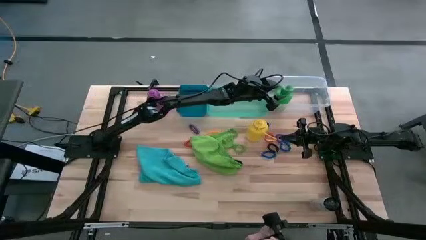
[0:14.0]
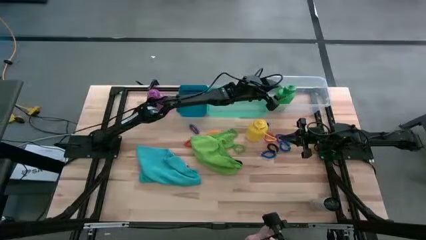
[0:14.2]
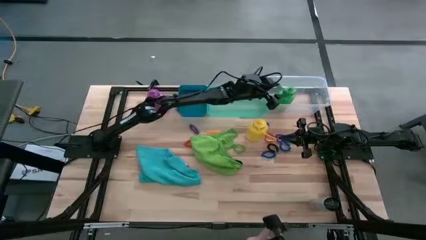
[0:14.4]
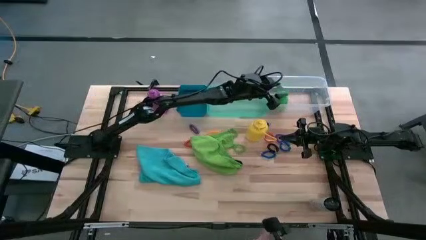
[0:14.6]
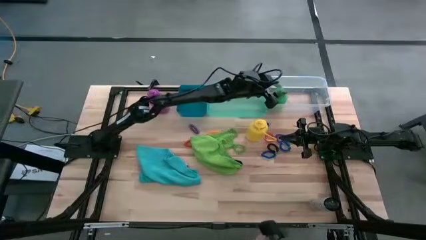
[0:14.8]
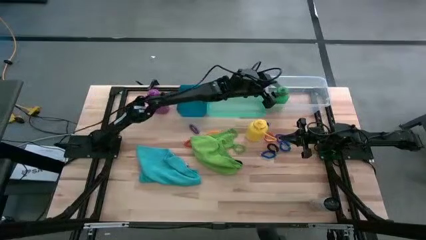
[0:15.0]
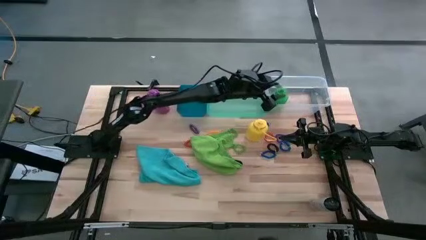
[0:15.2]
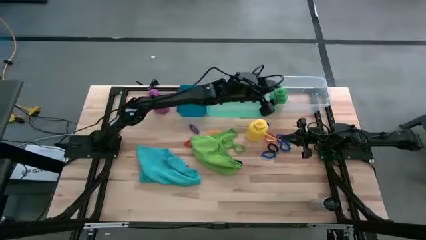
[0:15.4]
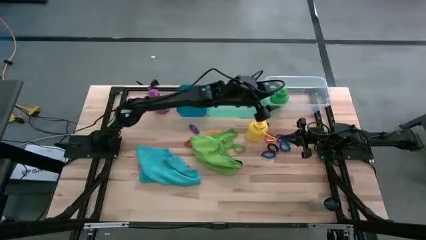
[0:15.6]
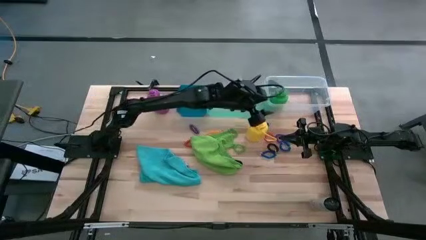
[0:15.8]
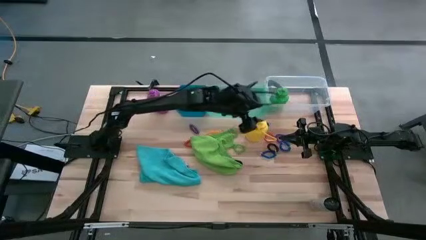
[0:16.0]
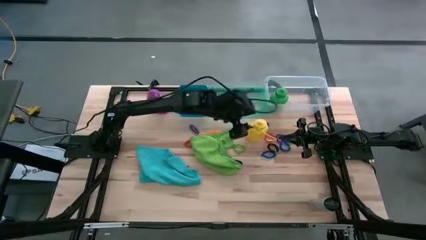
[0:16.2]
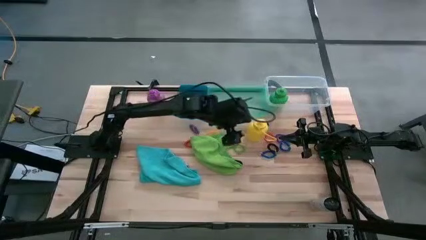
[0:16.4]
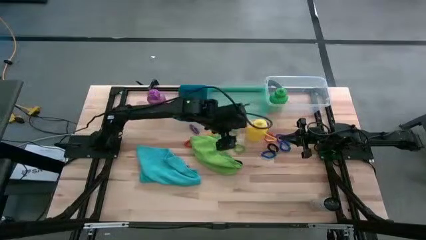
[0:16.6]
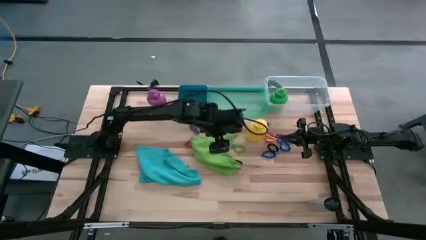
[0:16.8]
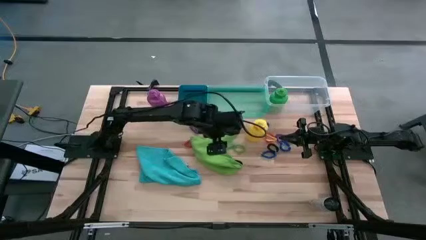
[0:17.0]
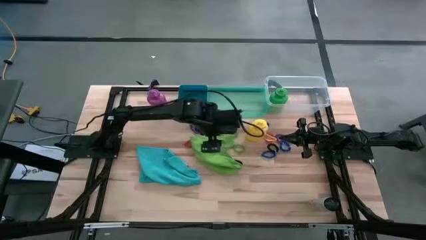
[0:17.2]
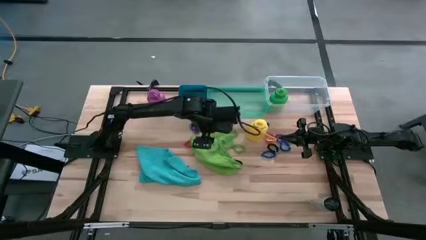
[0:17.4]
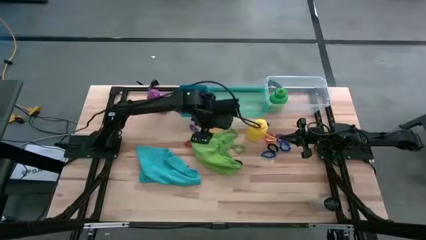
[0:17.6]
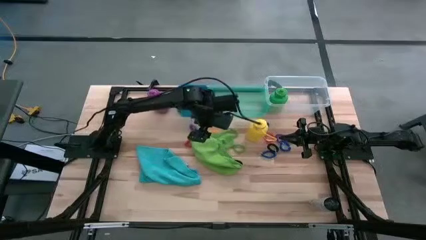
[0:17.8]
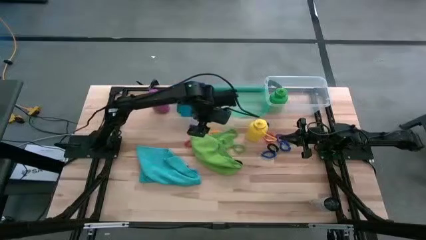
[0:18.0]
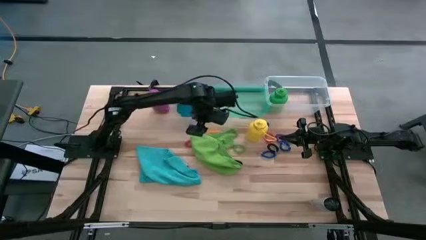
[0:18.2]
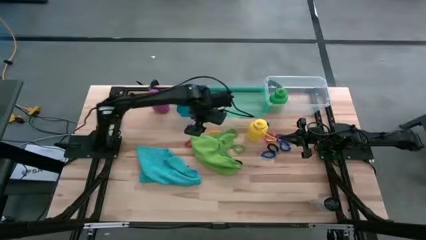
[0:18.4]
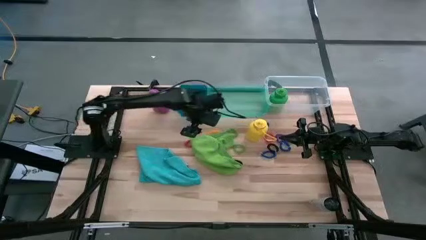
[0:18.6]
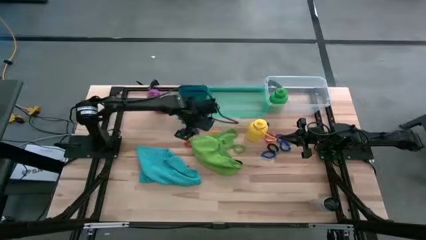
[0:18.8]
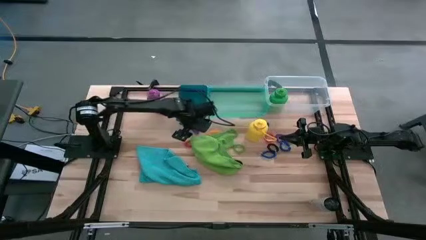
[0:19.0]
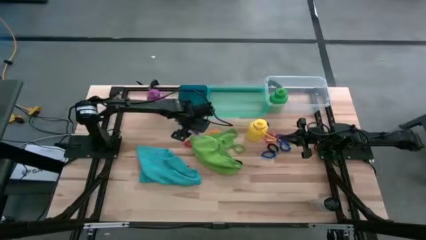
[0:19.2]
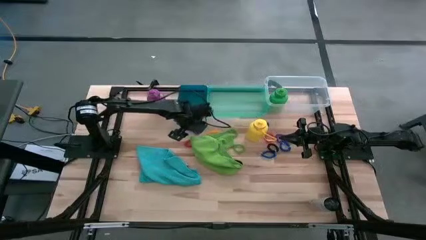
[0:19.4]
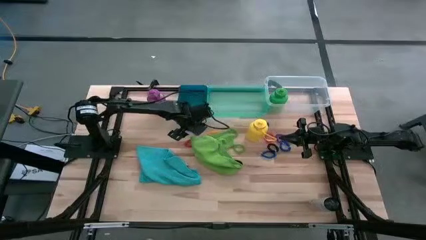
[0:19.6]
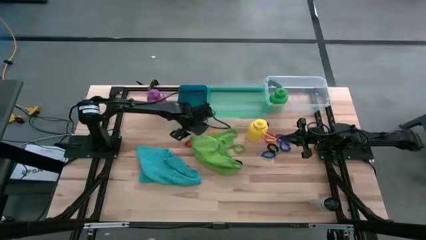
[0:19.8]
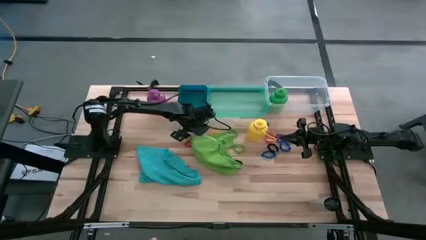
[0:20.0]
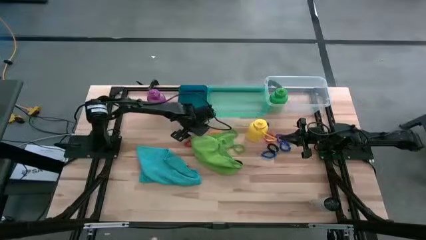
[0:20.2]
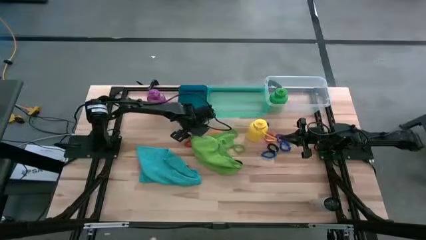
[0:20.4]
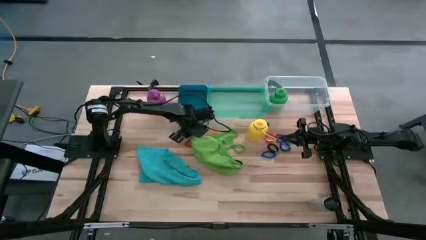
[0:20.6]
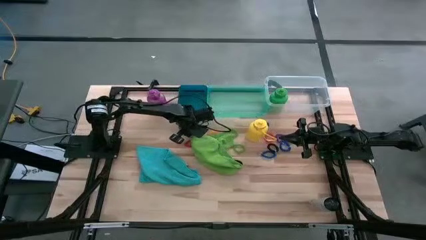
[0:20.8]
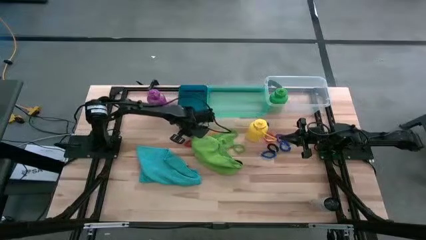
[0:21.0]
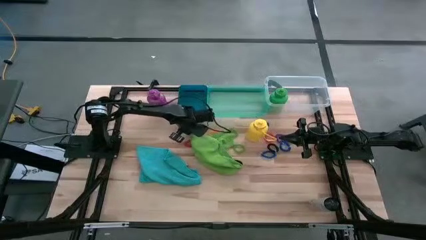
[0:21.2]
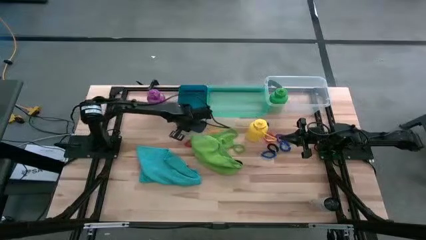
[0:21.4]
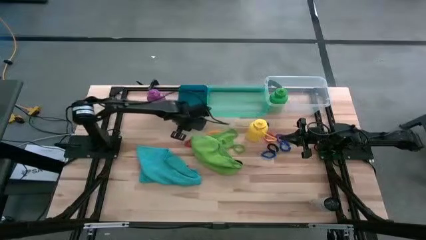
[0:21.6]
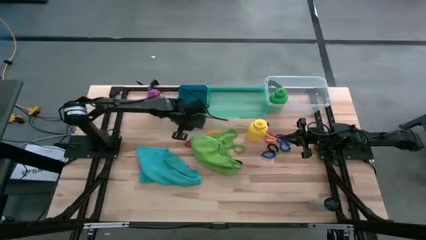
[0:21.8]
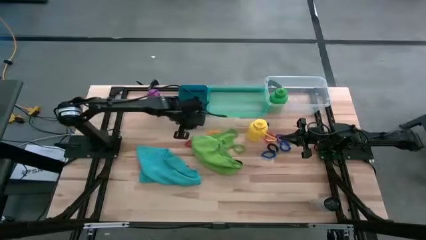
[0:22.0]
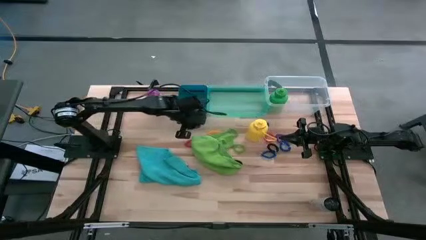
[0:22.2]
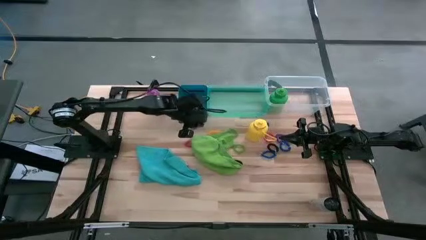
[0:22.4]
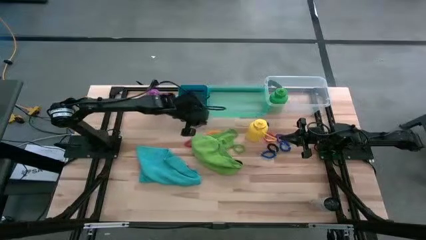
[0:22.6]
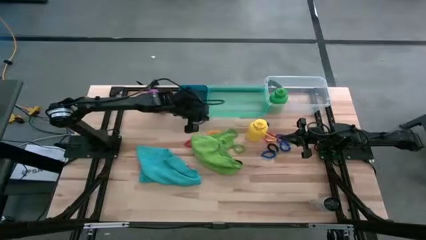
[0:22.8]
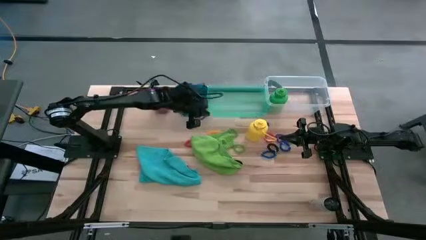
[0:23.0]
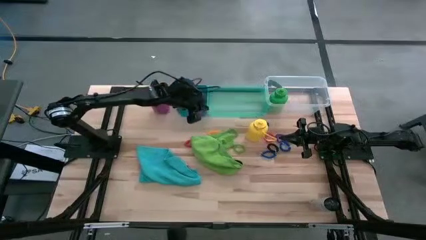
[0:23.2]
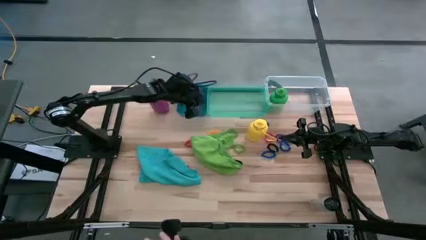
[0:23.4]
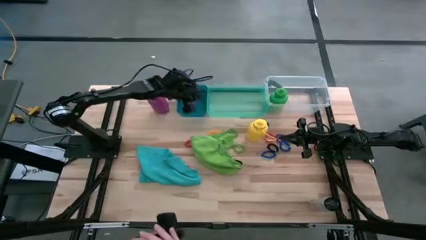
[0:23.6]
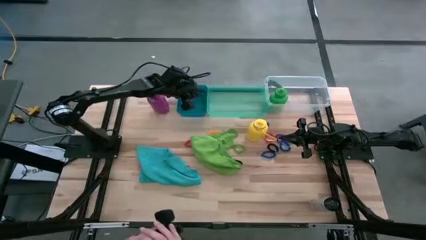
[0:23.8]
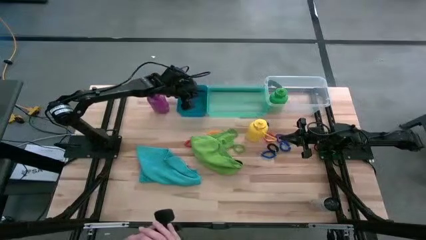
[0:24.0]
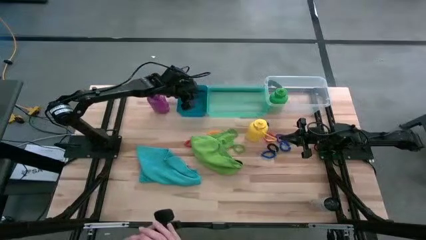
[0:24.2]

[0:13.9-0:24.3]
Task: Pick & Place Sports Items
Put the left violet spring keychain into the blue bin

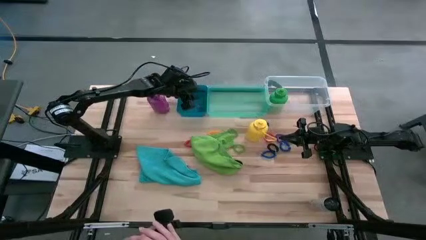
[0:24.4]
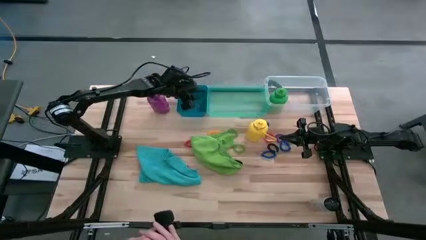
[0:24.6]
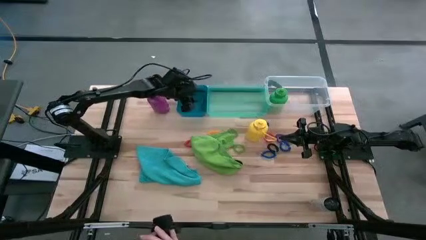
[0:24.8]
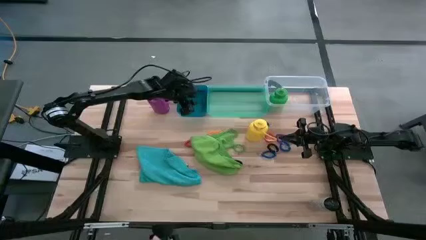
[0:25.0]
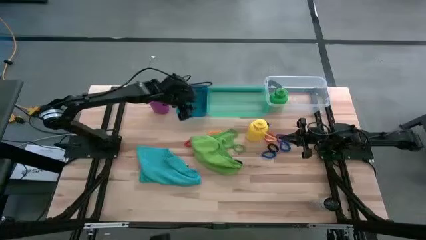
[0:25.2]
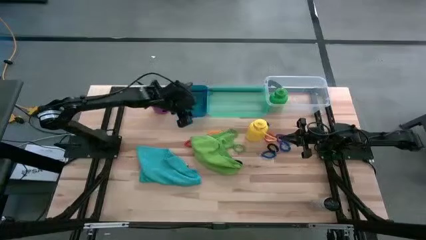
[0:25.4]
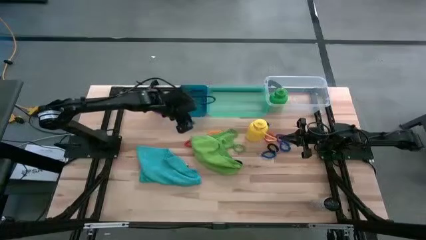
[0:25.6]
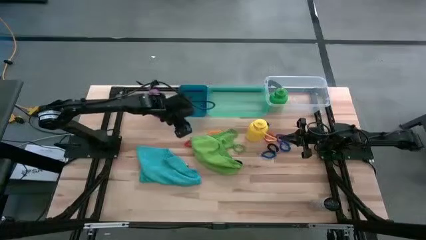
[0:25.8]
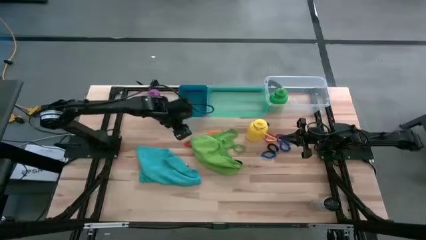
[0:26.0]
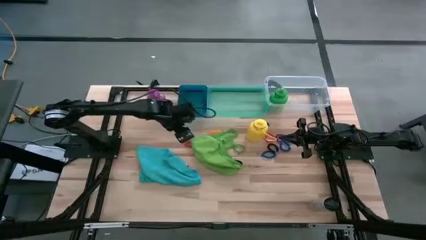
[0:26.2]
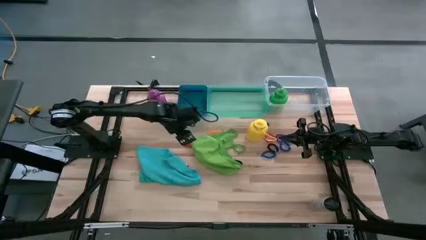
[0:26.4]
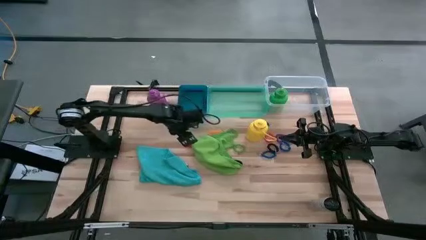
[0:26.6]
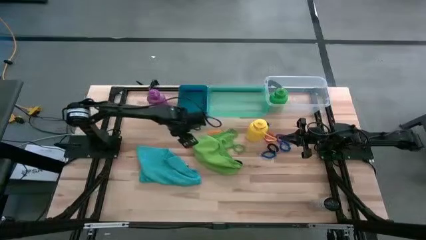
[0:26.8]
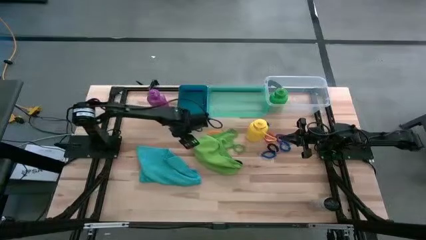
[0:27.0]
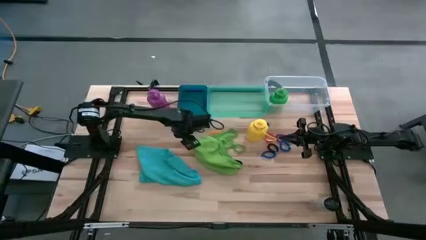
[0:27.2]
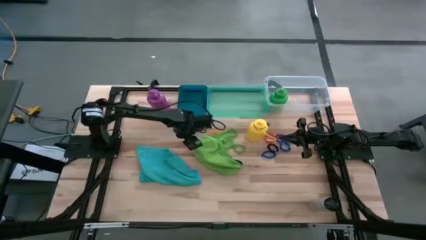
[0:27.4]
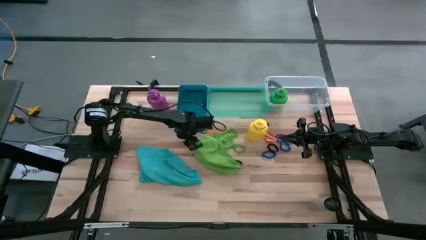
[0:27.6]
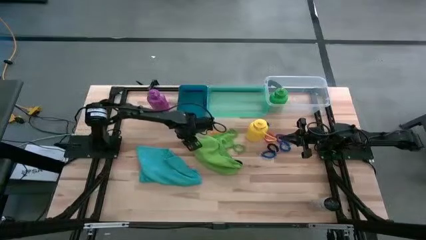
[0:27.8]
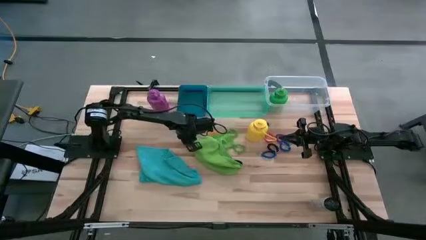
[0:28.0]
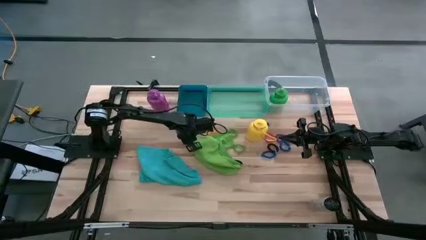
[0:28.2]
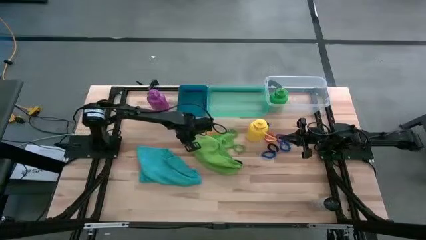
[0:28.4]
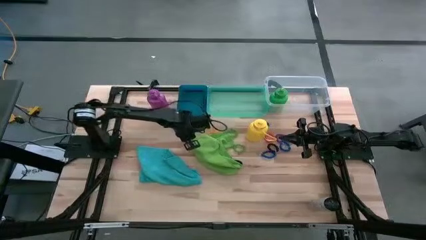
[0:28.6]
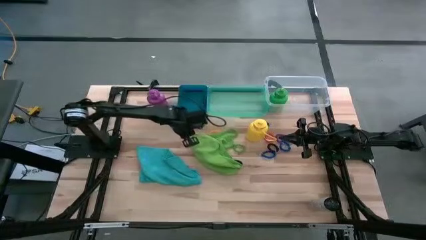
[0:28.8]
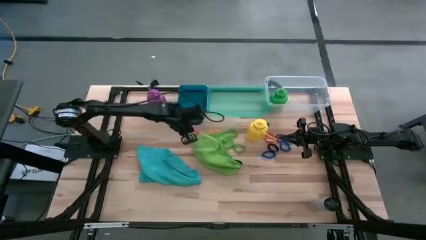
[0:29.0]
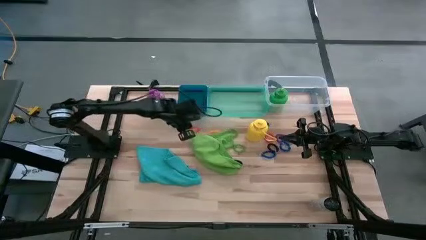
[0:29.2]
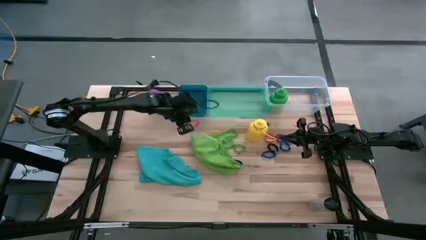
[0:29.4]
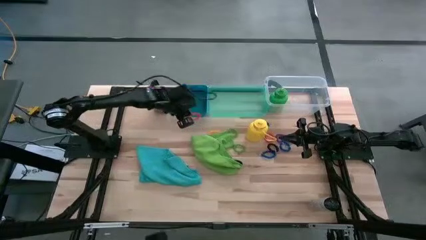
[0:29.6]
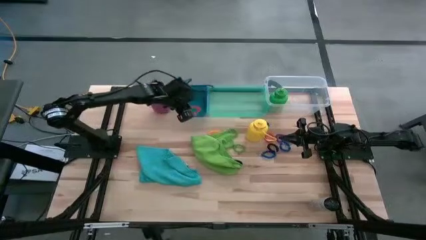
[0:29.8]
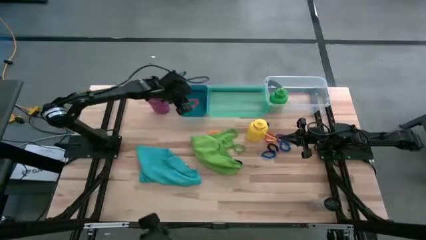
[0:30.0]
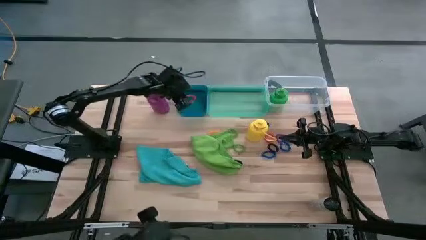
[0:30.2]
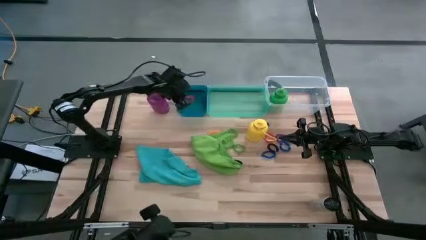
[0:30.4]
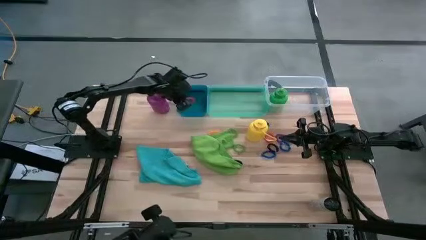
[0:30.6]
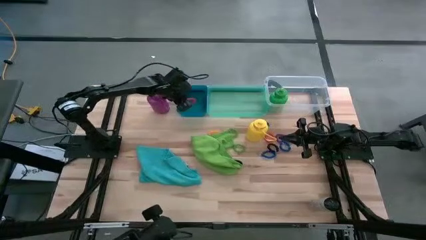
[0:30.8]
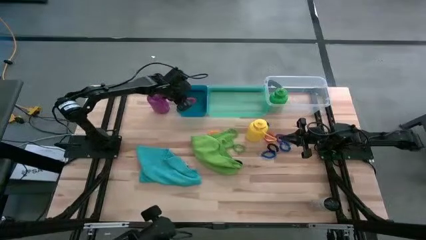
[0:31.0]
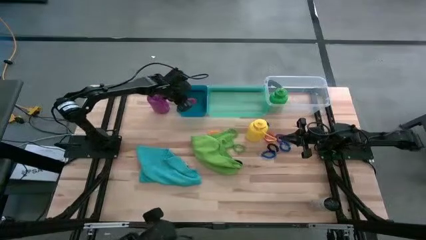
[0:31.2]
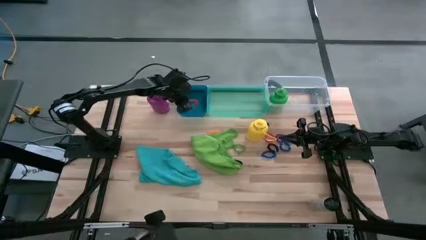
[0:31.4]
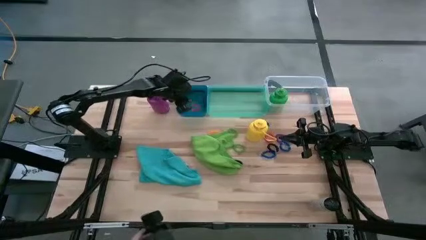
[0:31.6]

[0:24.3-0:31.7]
Put the left red spring keychain into the blue bin
